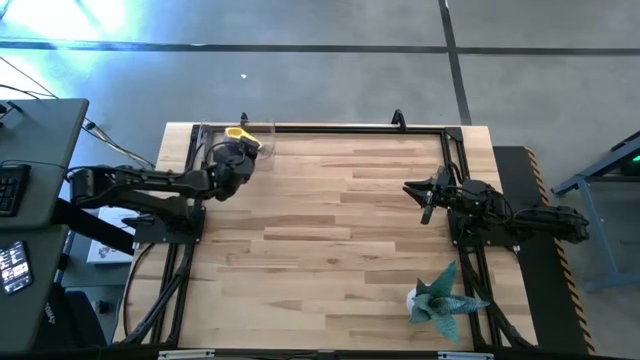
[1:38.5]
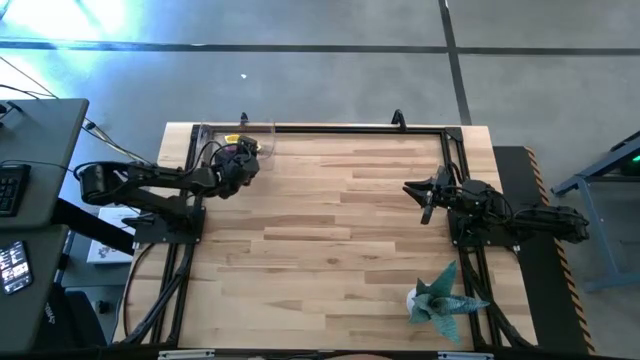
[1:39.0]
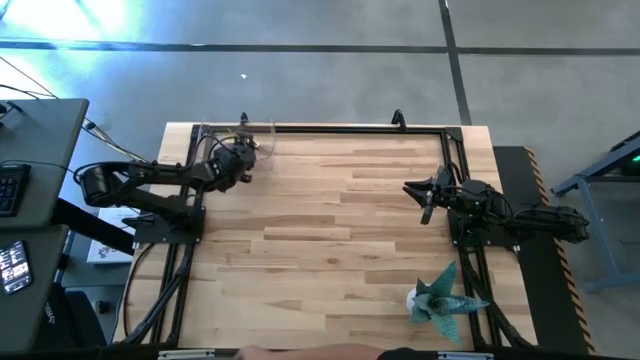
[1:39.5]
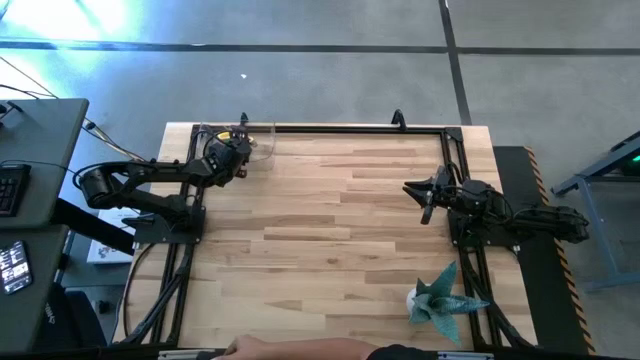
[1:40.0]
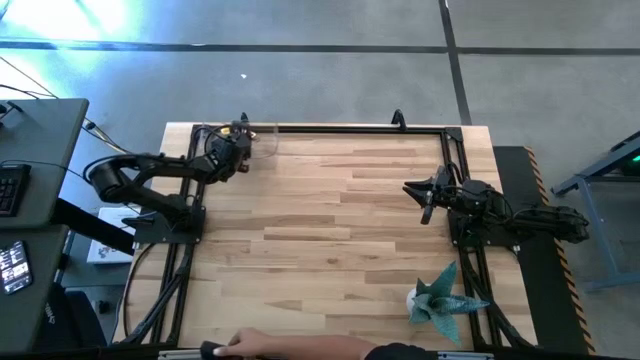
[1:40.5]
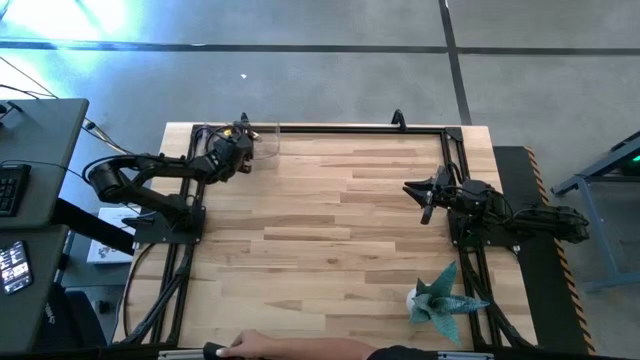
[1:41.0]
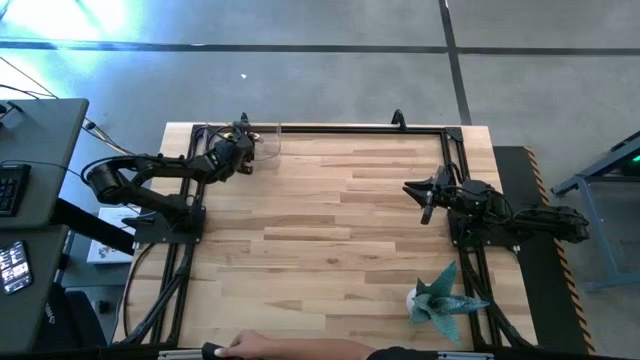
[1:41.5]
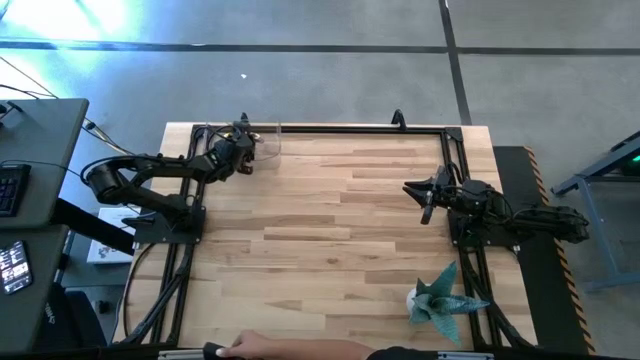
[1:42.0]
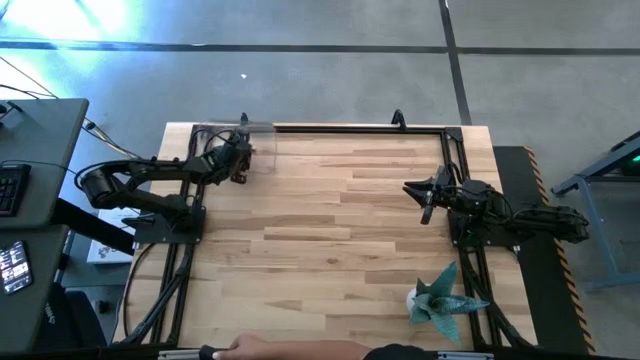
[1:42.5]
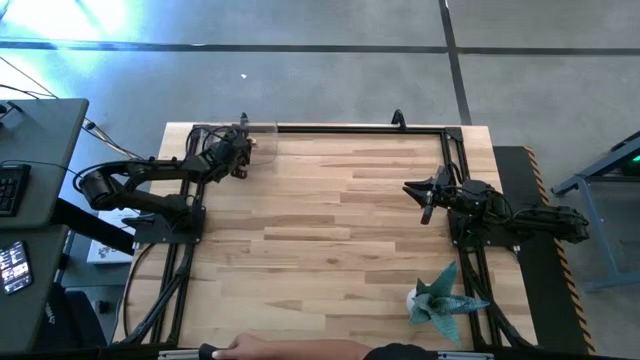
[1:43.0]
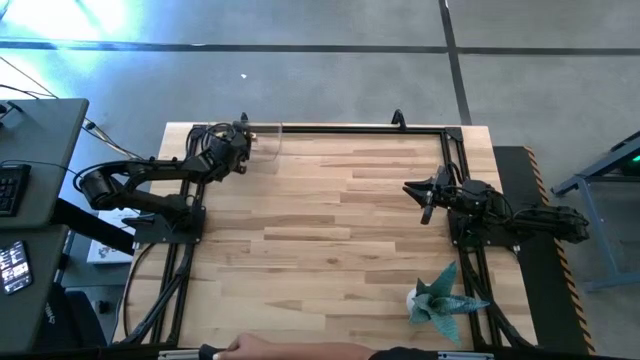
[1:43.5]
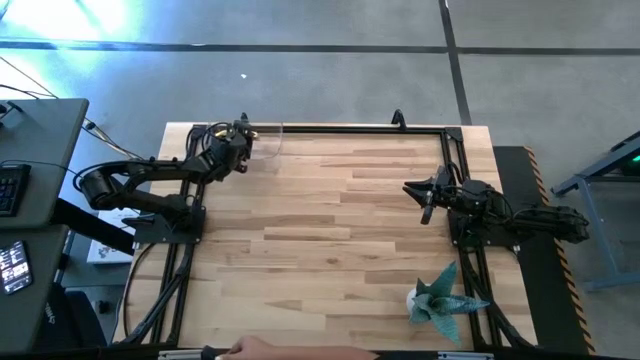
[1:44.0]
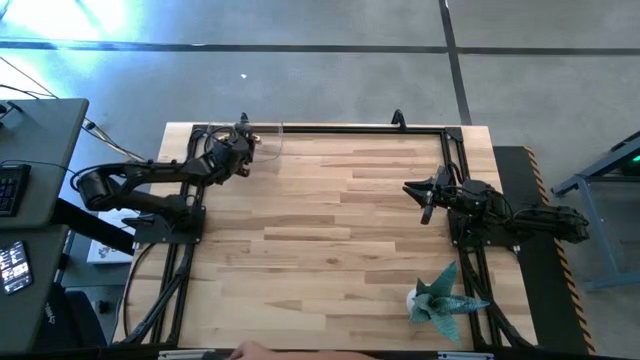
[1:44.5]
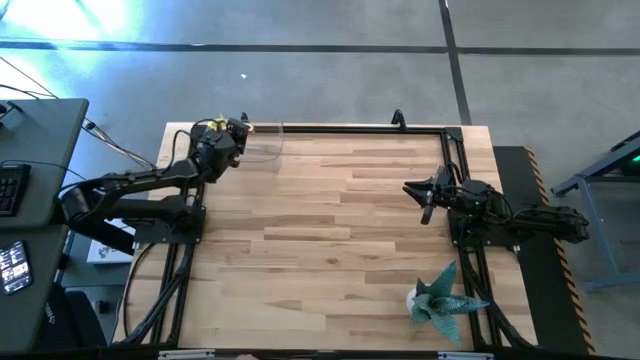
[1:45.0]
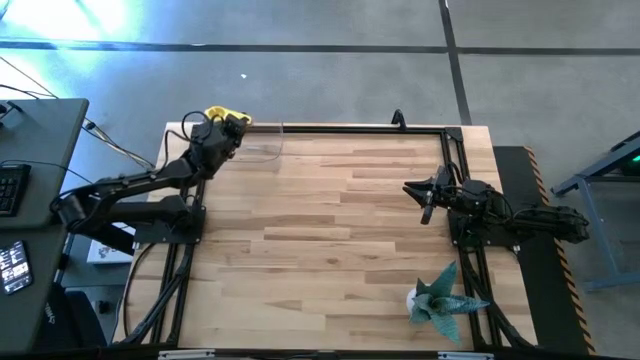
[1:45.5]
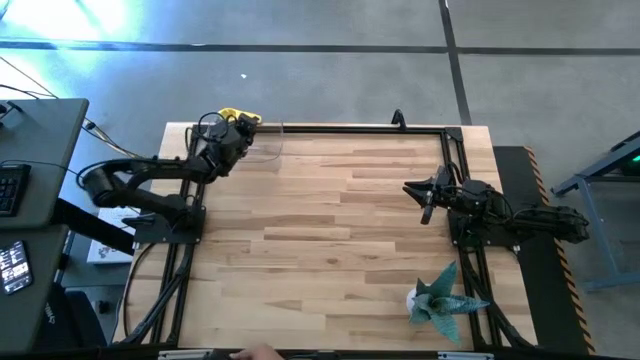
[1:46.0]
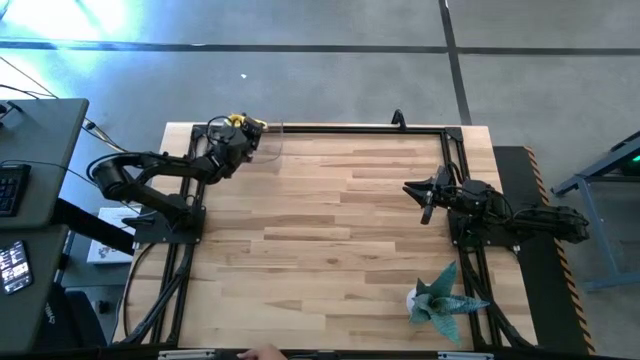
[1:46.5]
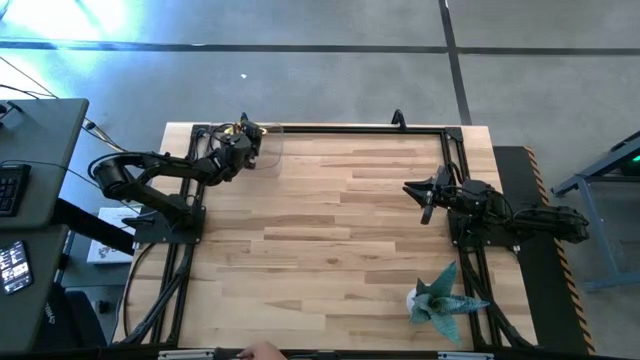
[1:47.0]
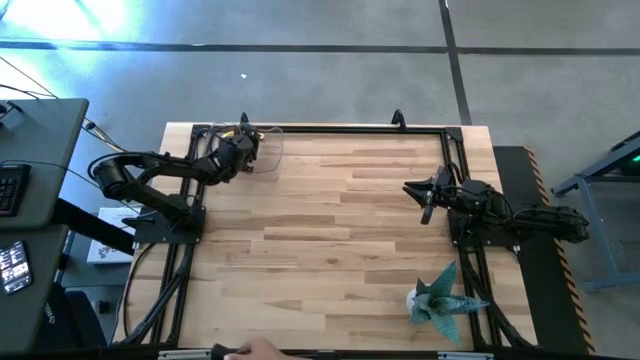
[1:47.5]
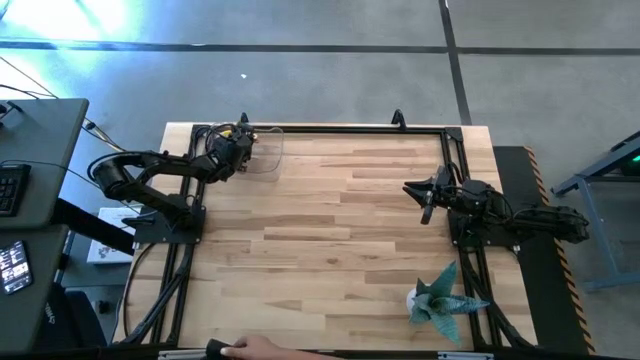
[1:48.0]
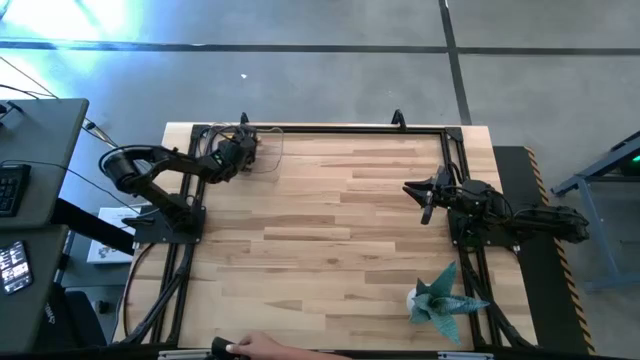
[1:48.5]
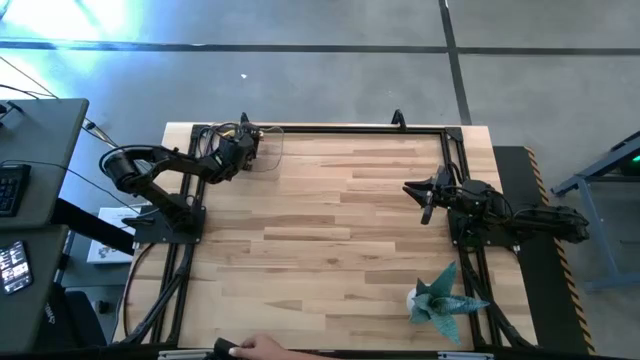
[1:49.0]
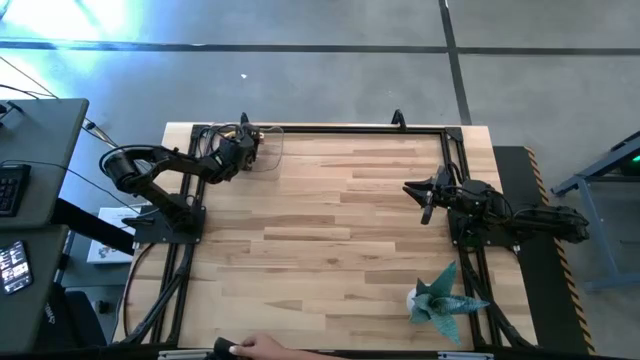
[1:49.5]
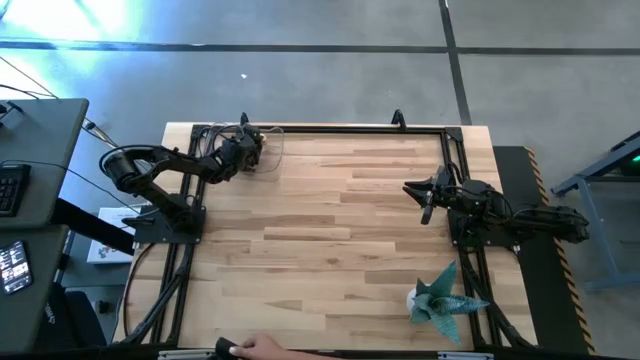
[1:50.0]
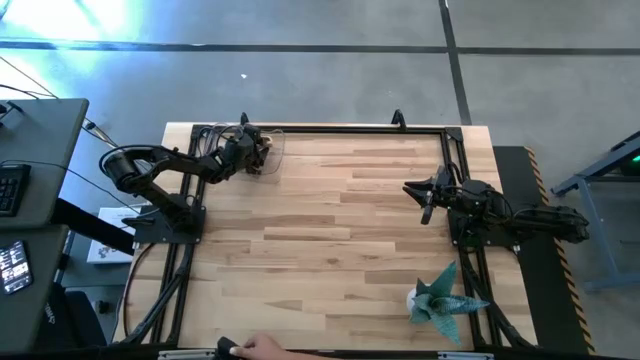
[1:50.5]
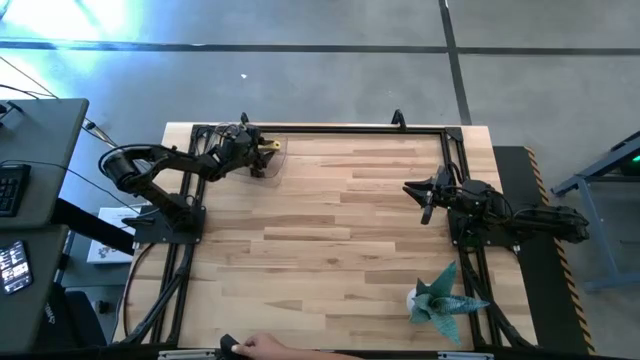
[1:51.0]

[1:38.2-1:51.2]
Task: Nest measuring cups in basket
Put the stacked, colored measuring cups into the transparent bin

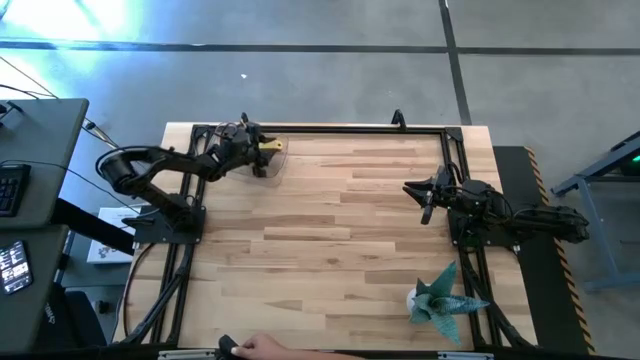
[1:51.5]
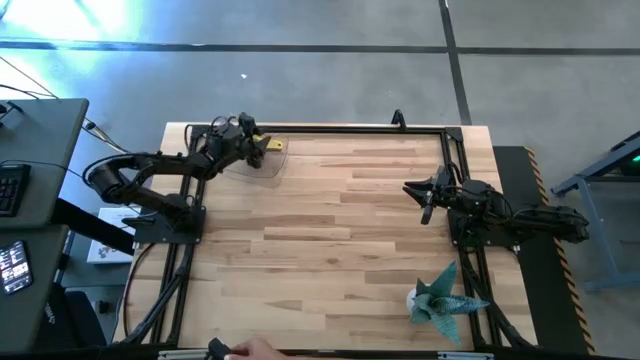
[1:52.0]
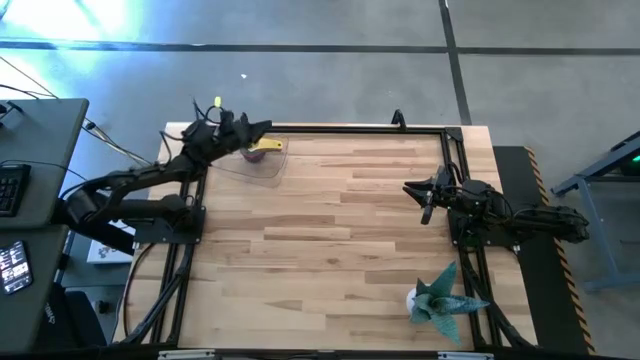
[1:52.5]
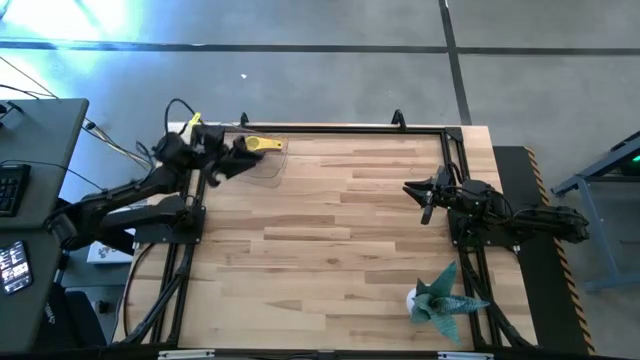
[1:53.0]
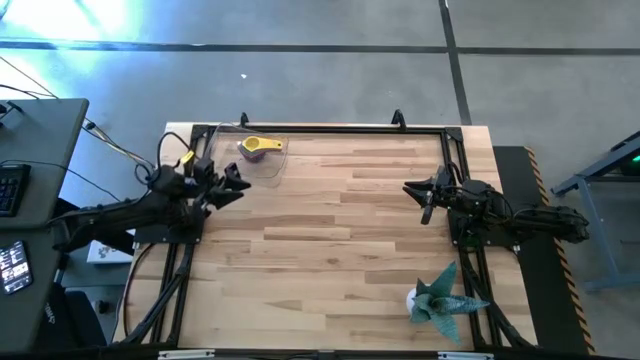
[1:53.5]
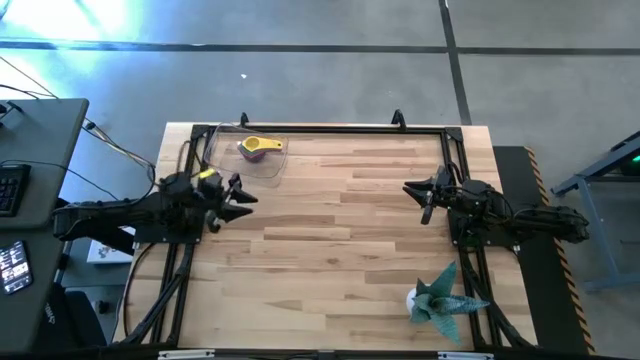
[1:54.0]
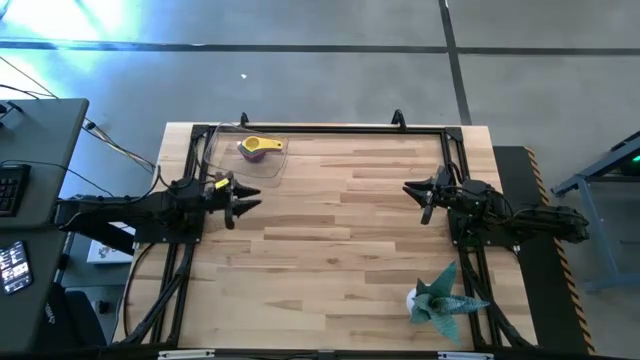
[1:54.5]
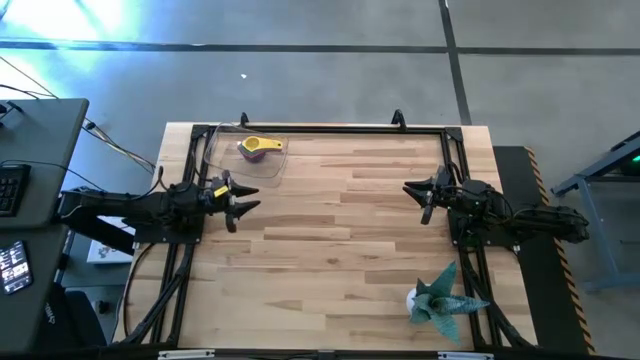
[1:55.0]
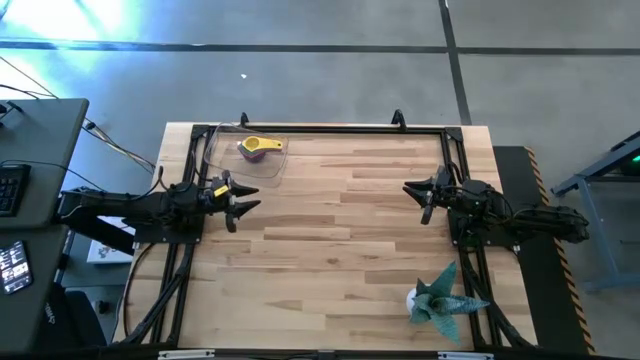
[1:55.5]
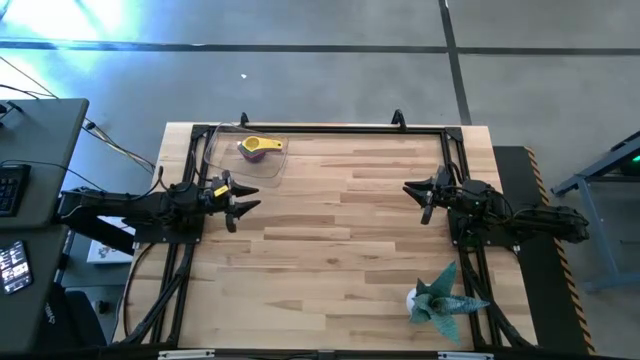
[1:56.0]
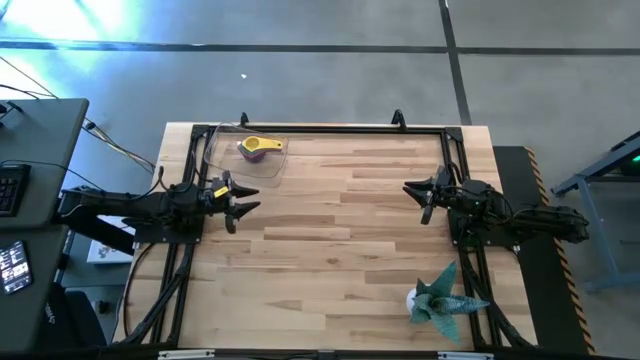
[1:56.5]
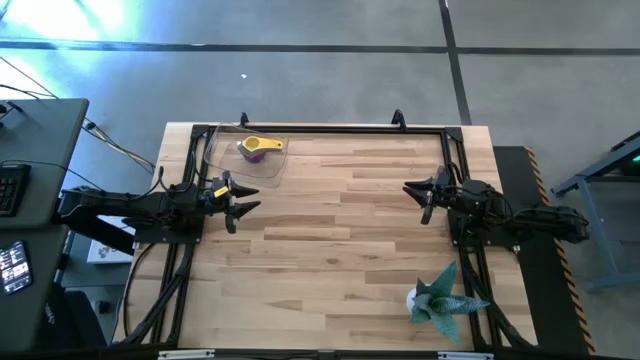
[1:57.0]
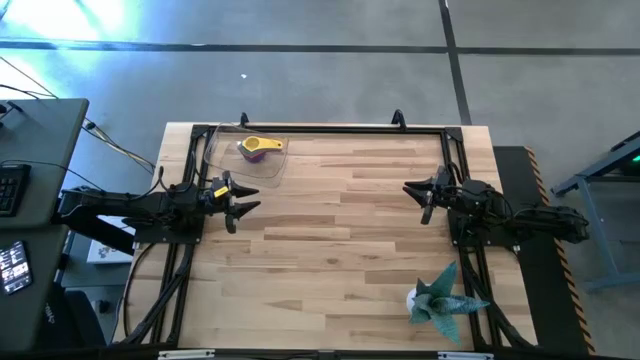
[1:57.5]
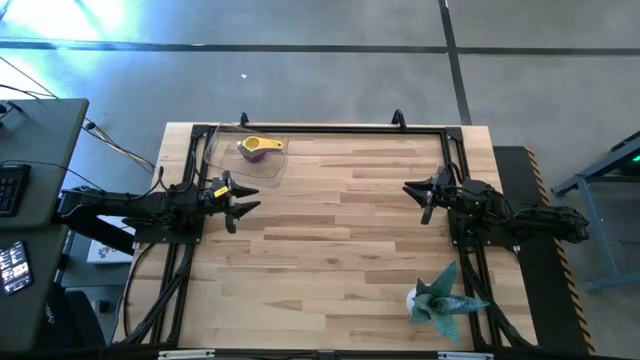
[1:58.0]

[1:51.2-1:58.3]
Return to Home Position
